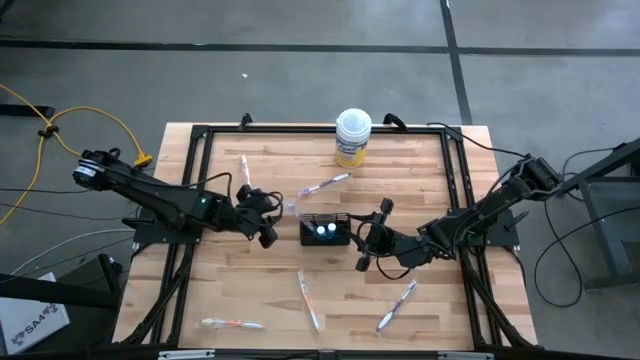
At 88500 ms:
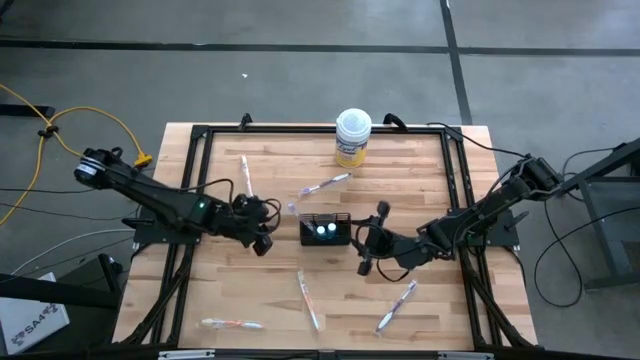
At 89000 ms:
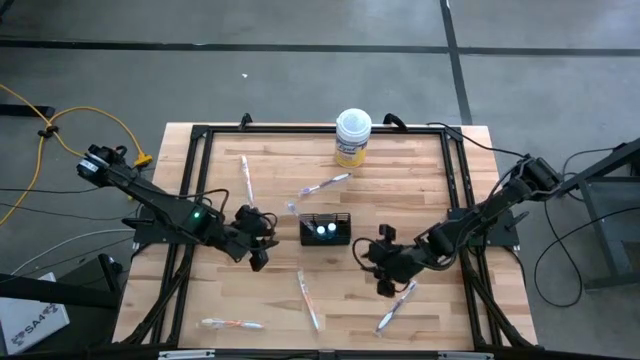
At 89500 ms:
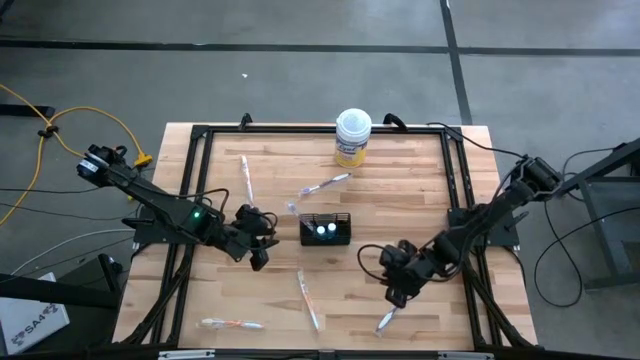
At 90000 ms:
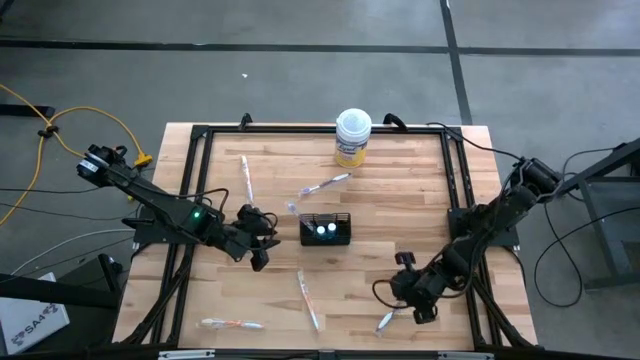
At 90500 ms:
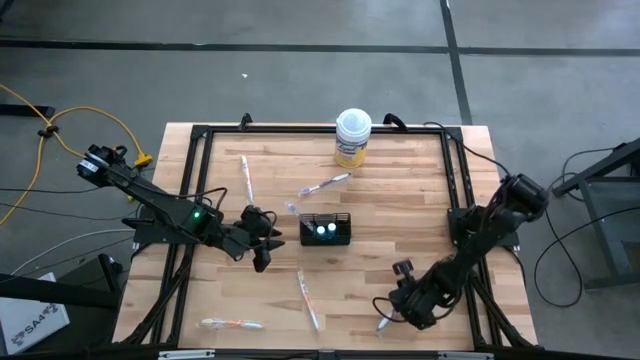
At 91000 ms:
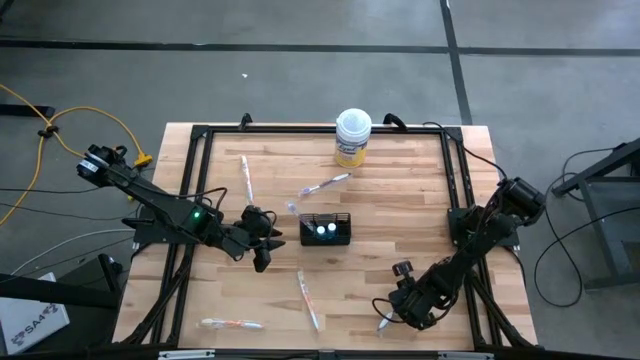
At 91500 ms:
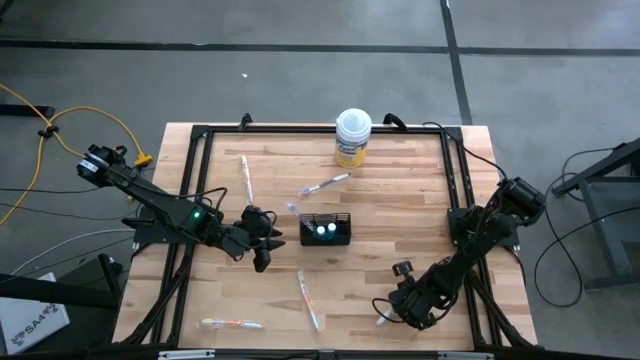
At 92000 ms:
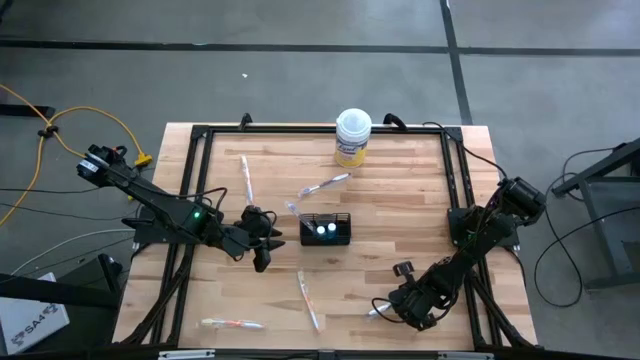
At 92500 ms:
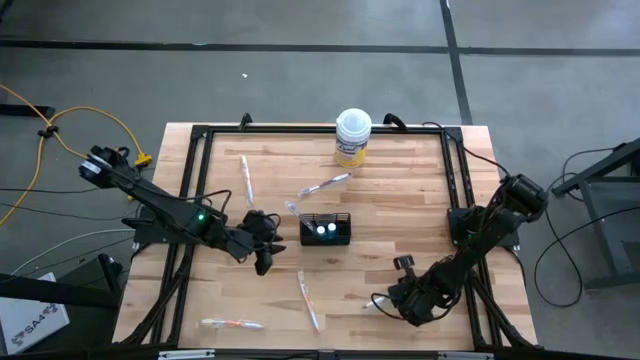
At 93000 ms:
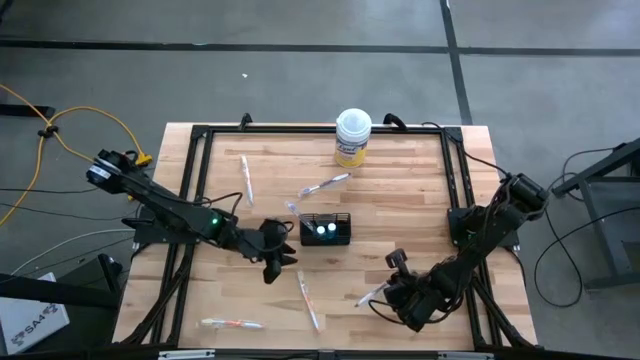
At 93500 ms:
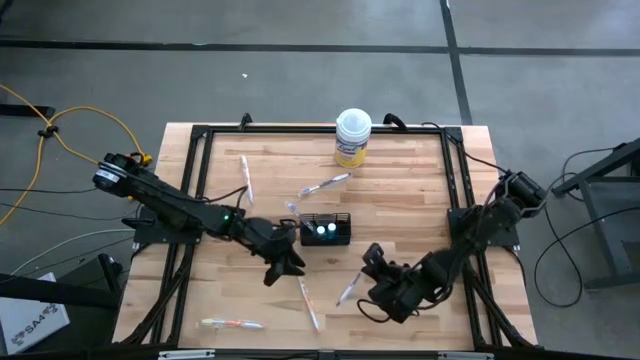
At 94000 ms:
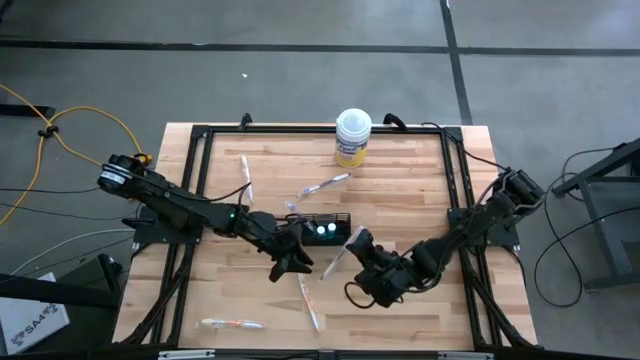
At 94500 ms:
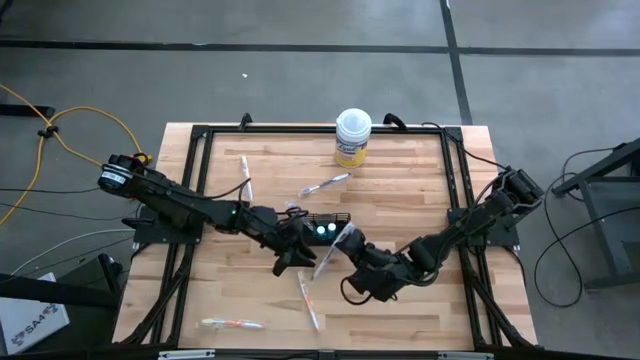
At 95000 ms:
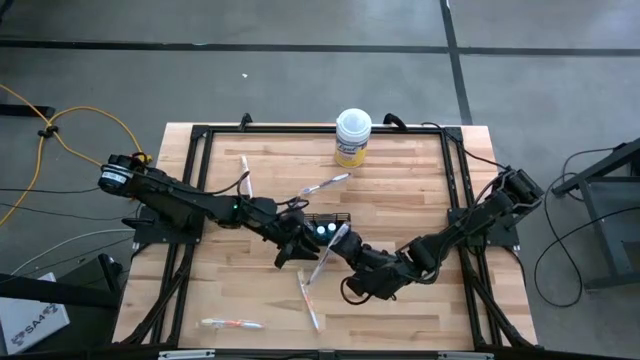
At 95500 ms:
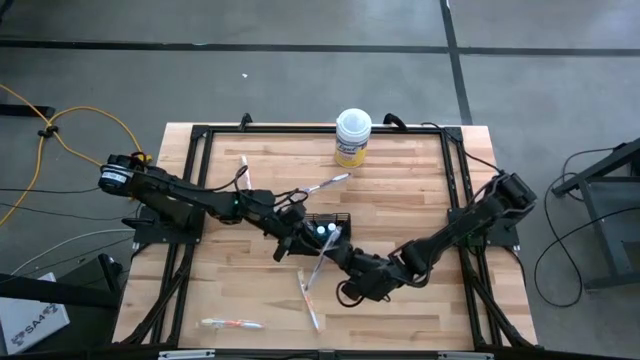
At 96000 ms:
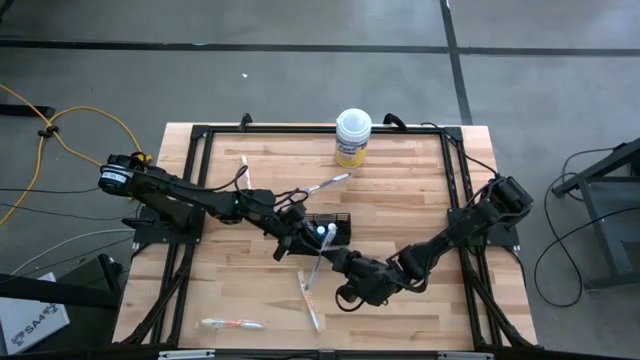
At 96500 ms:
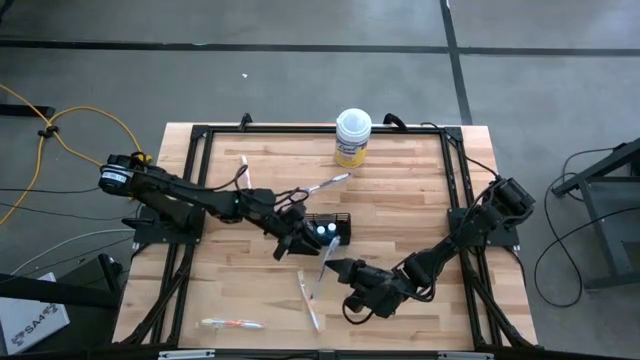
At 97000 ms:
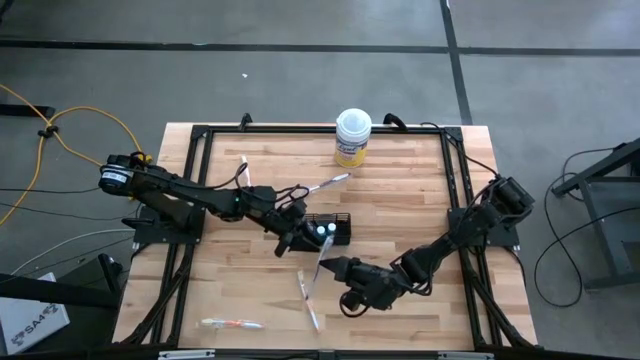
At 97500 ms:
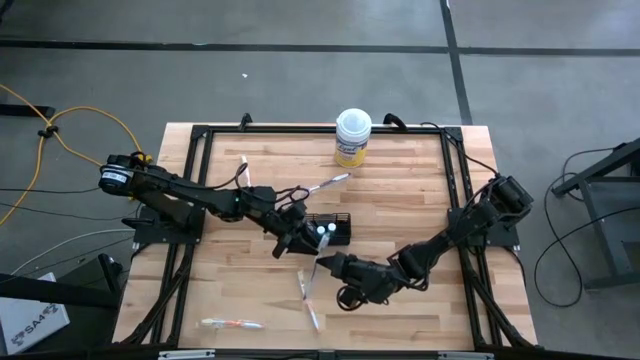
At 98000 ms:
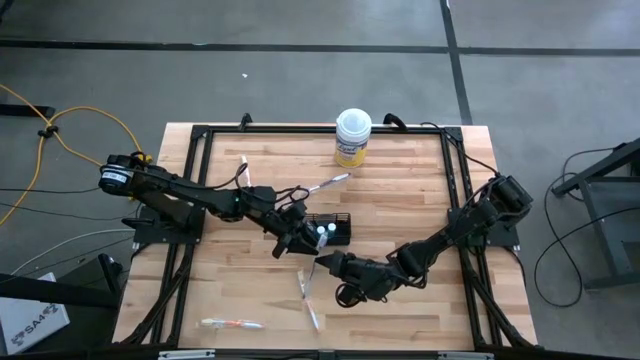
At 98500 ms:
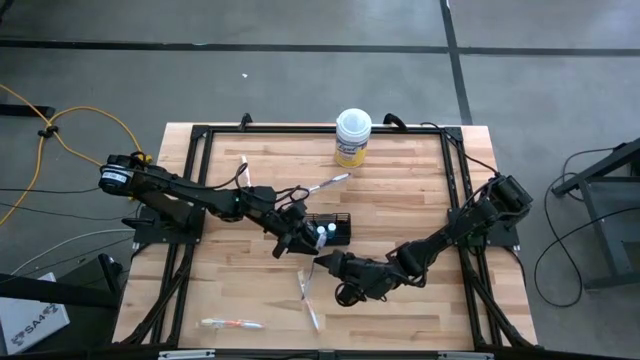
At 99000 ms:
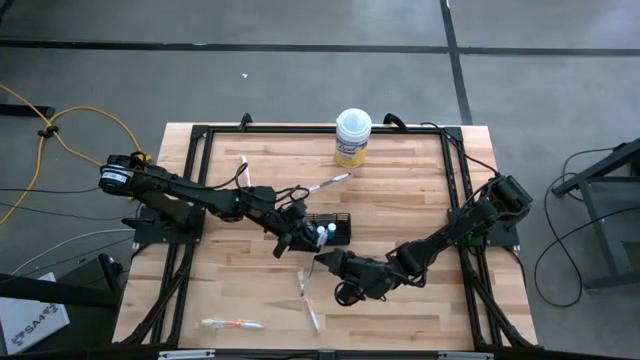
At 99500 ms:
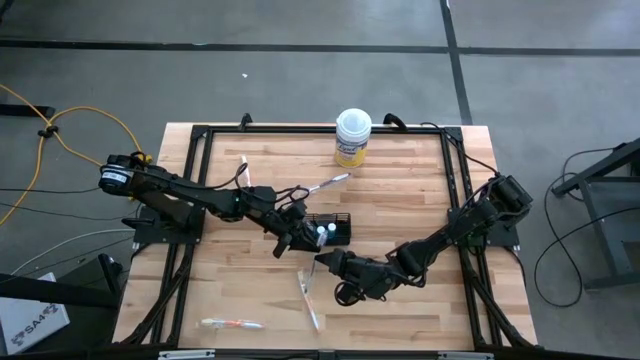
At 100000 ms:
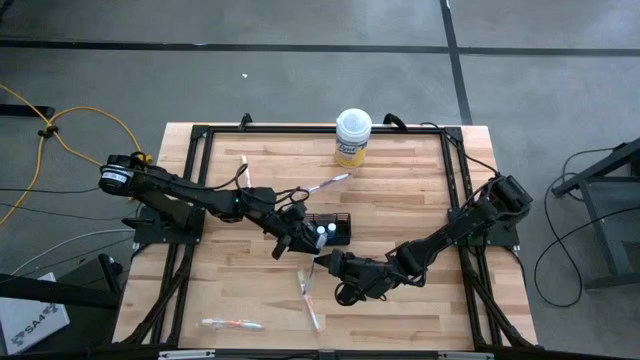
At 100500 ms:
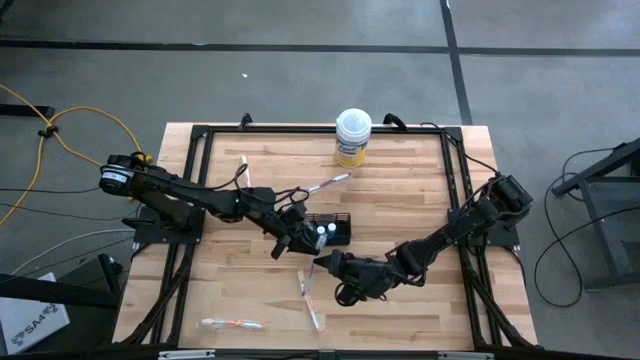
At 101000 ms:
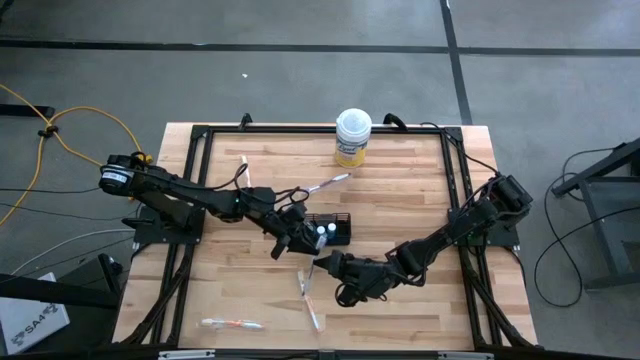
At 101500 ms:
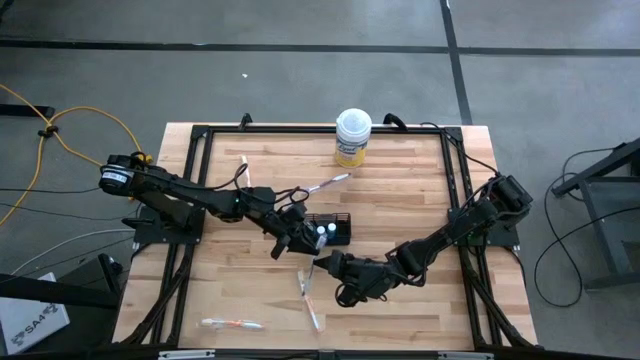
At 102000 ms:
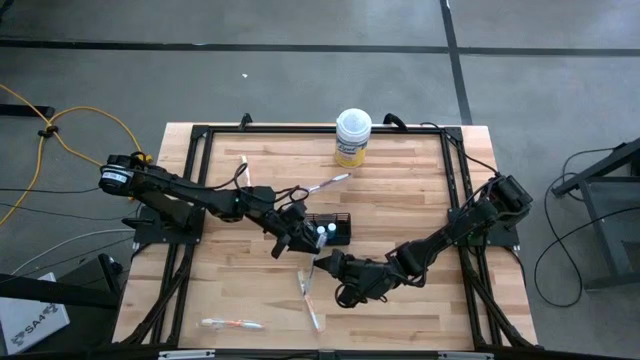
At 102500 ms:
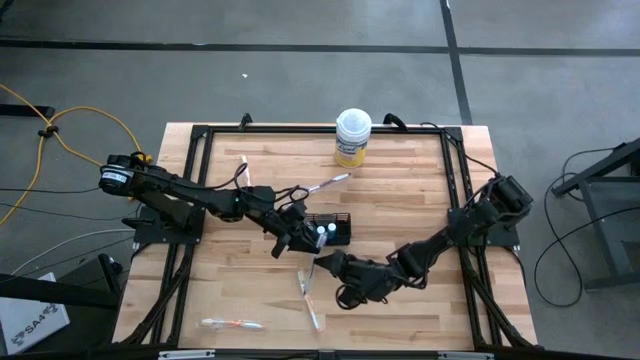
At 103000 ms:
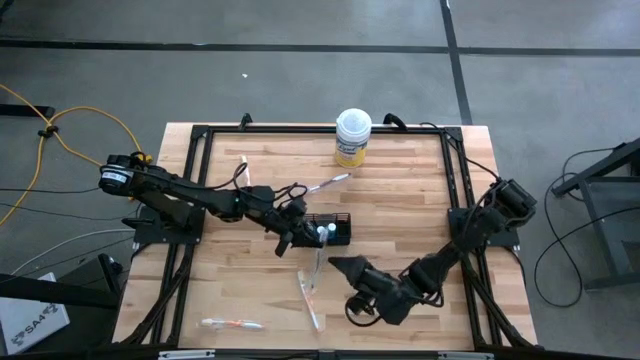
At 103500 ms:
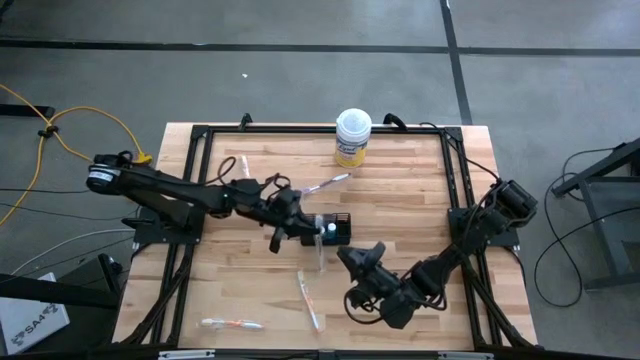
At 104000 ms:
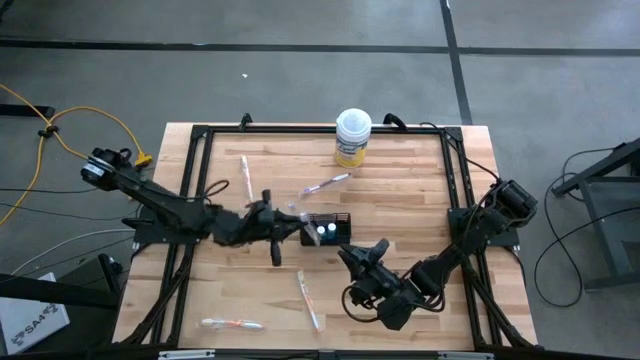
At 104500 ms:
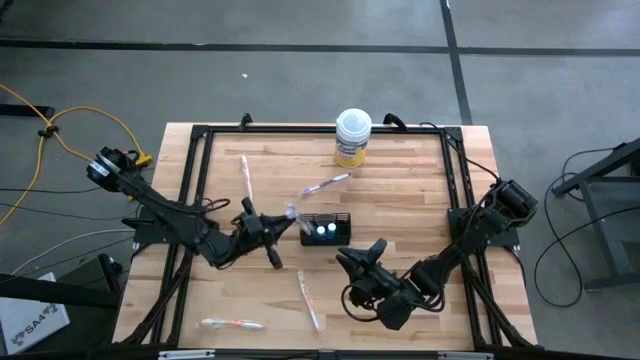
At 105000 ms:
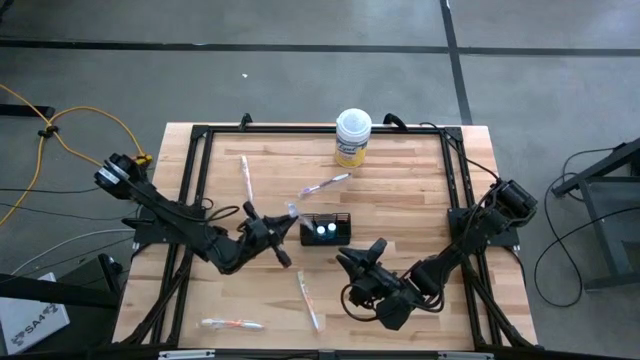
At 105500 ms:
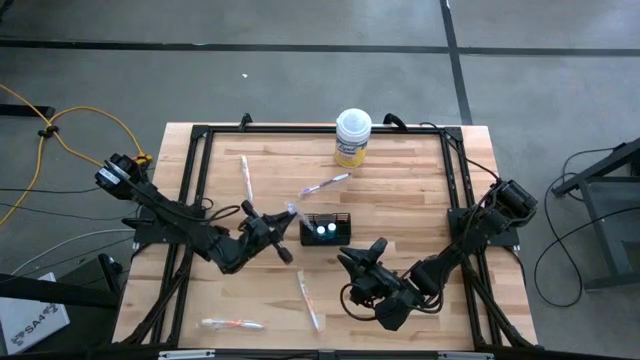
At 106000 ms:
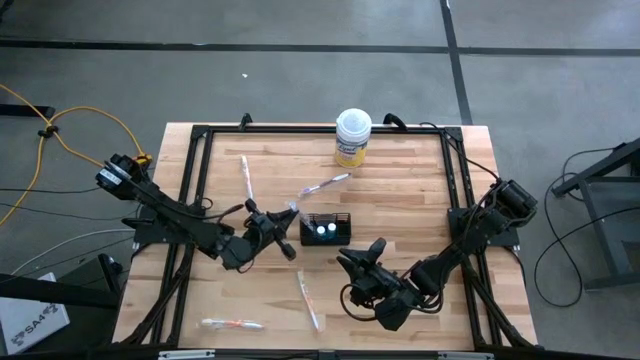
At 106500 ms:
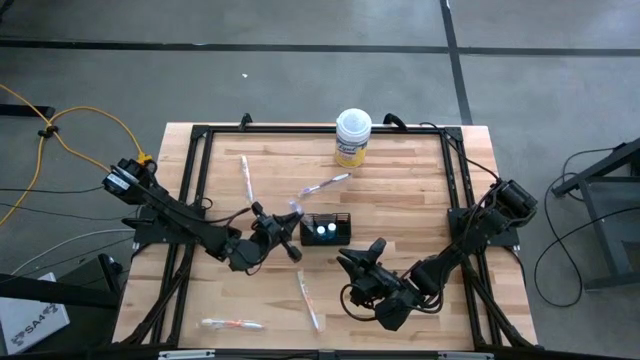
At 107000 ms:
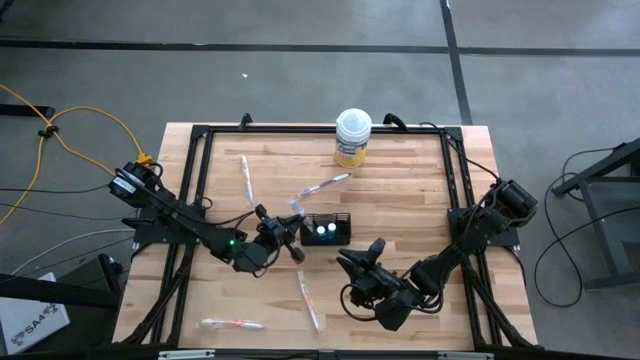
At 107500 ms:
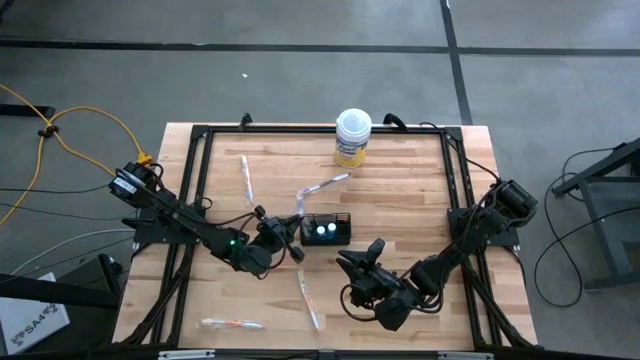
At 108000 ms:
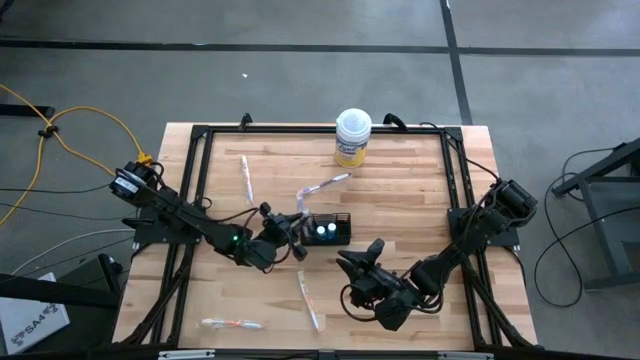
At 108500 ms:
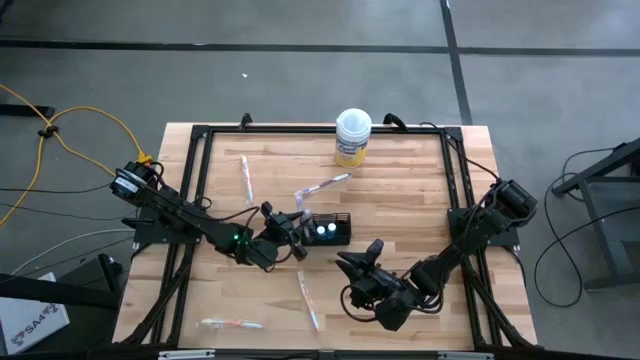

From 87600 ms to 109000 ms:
Task: Pick & Place toothbrushing station
Put the bottom purple toothbrush into the wire organizer

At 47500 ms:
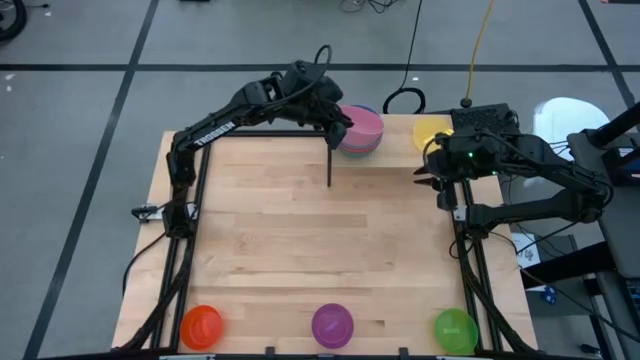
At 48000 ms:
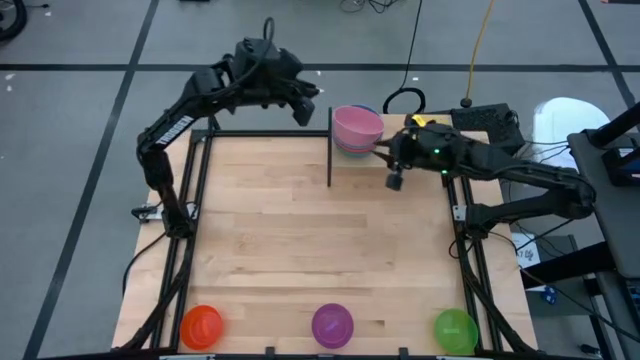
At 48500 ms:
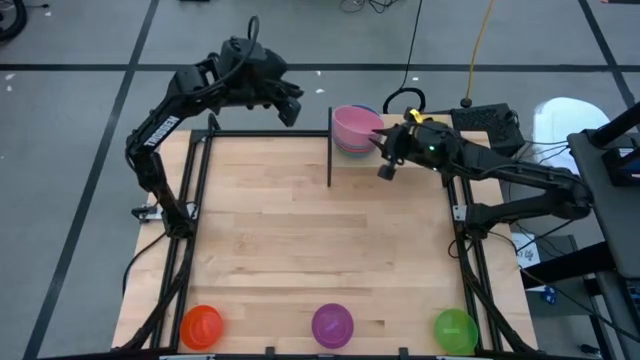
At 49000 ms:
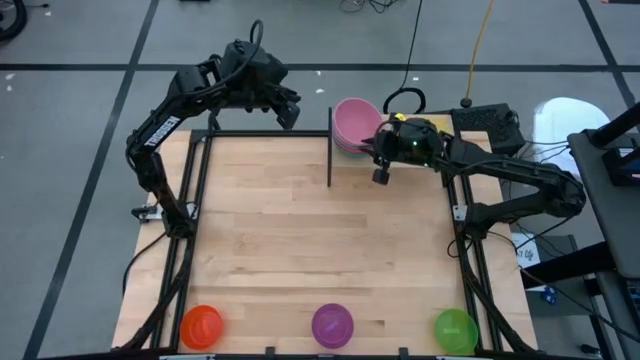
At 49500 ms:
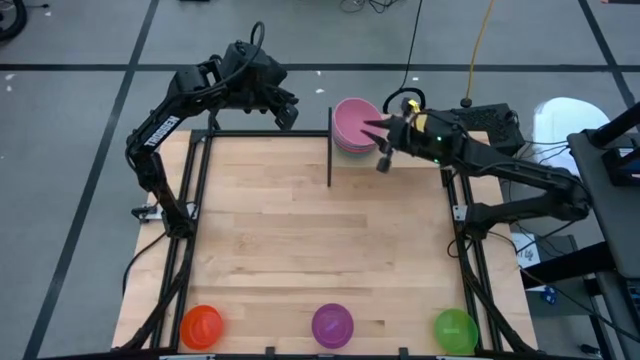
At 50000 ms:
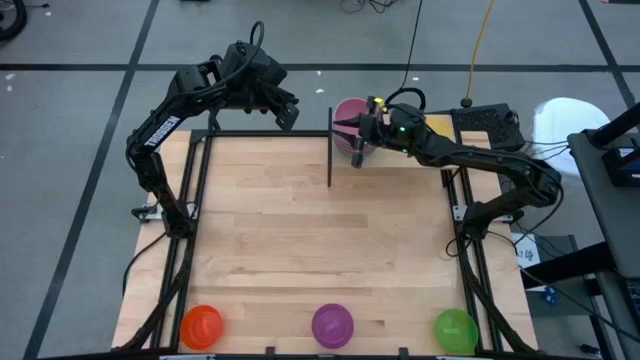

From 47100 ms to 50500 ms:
Task: Place and stack bowls onto a shelf
Adjust the pink bowl on top of the blue bowl on the shelf
